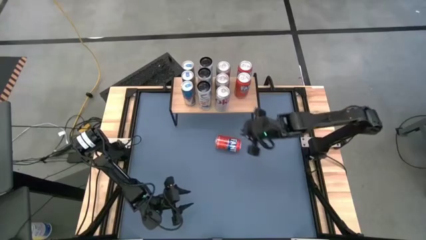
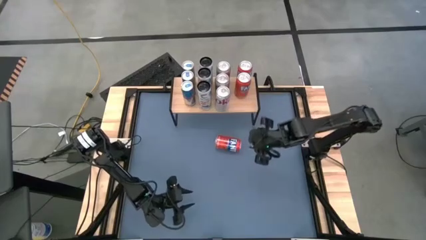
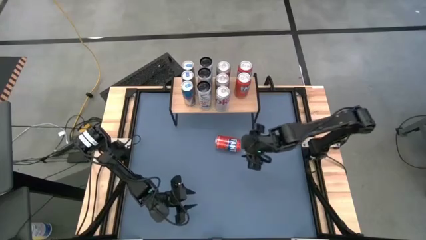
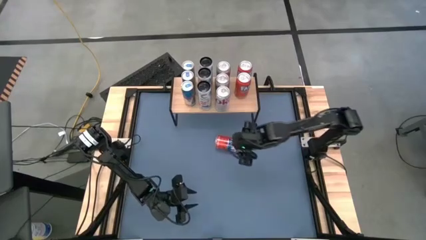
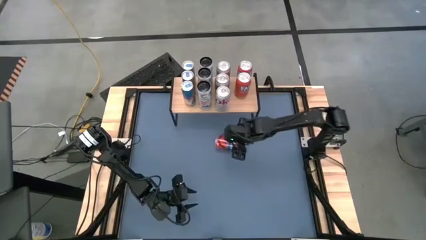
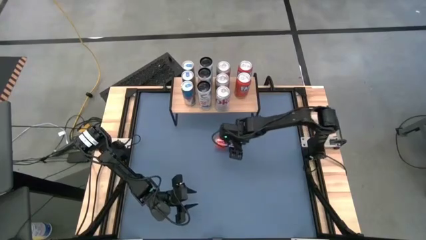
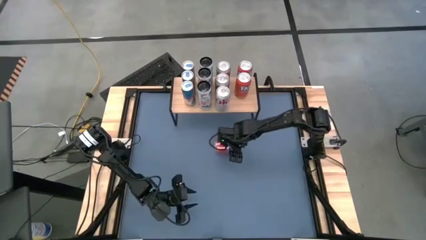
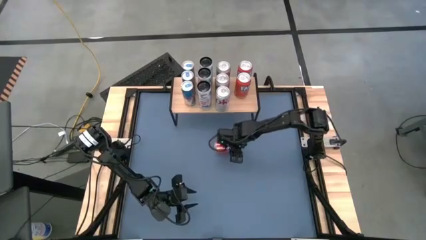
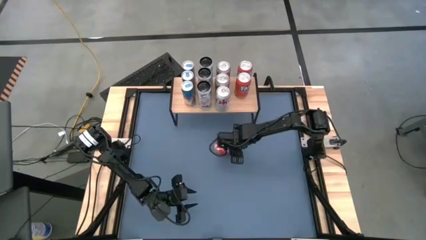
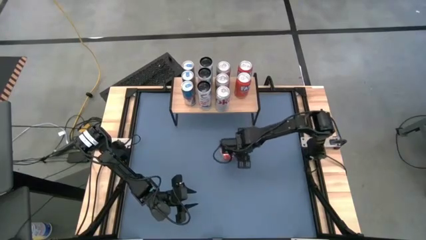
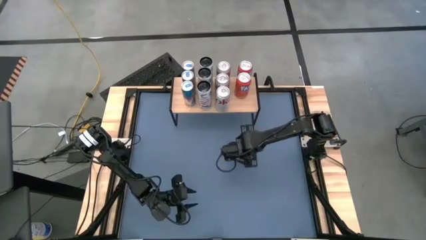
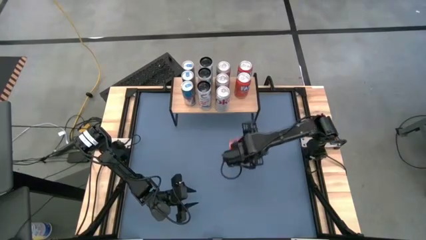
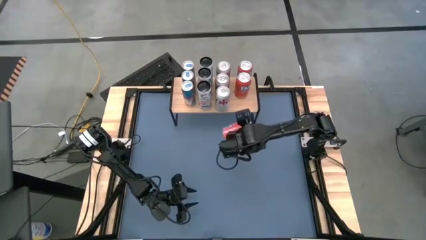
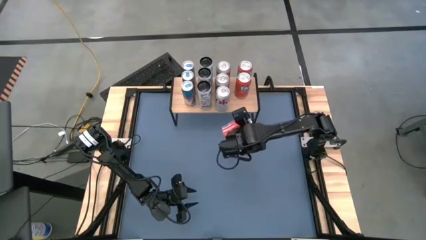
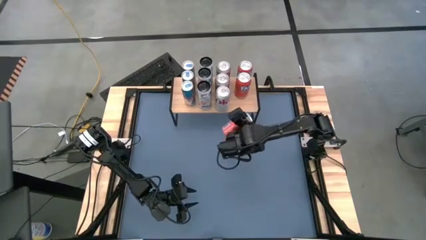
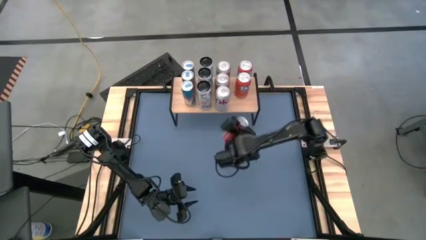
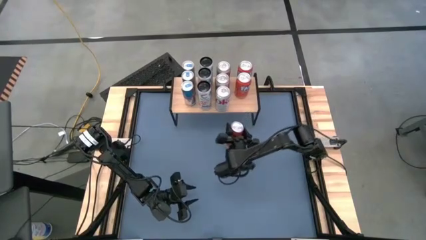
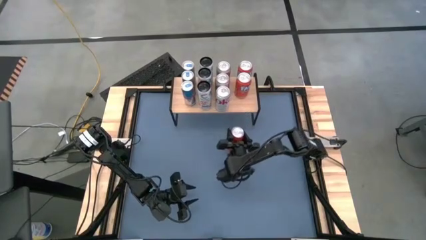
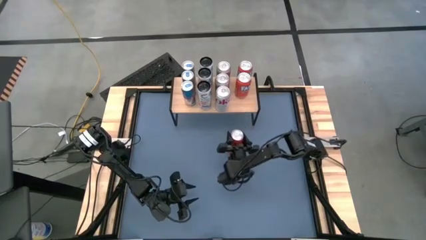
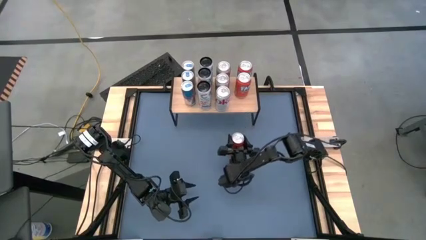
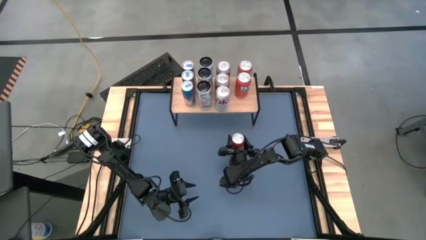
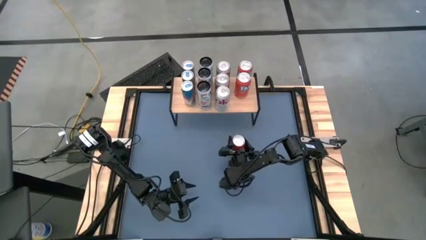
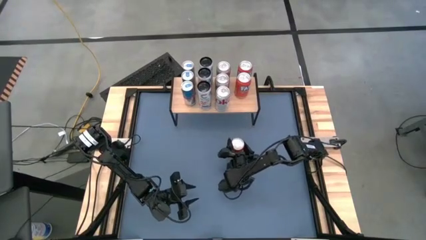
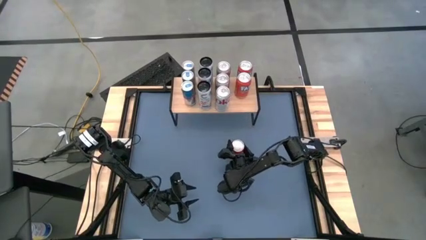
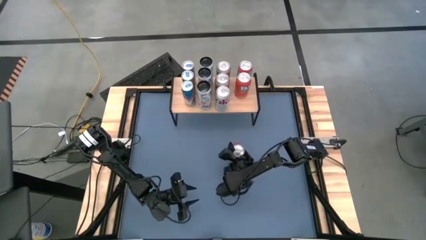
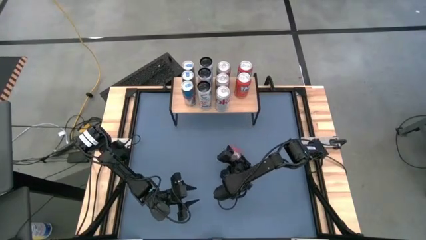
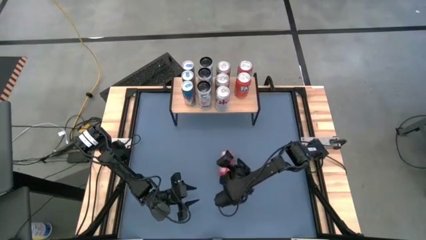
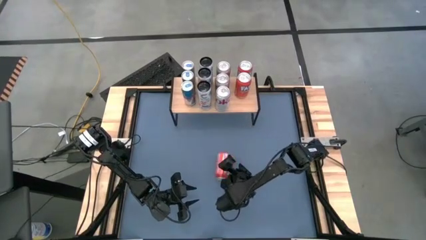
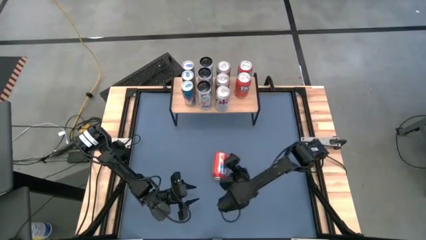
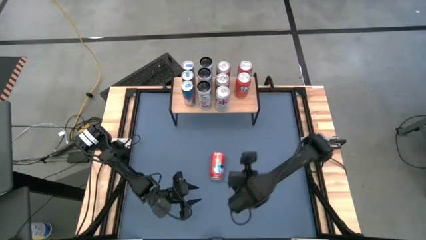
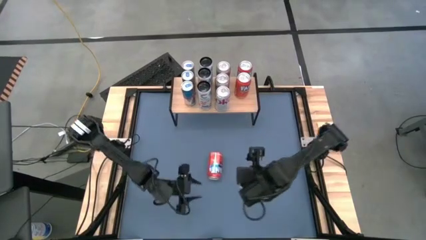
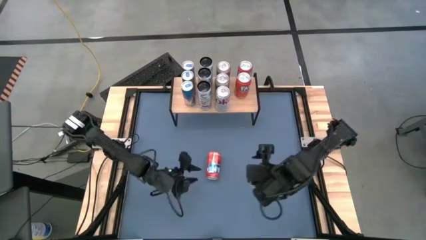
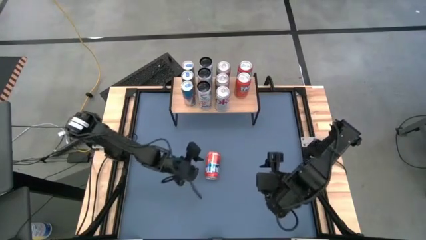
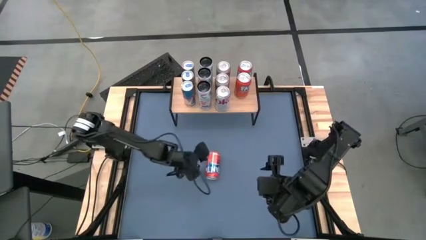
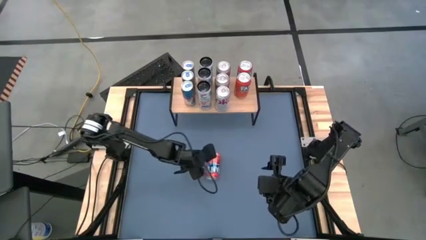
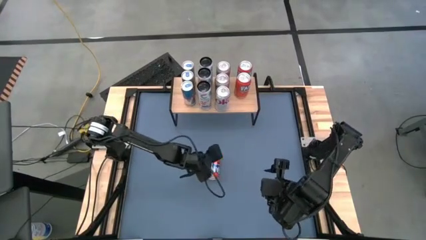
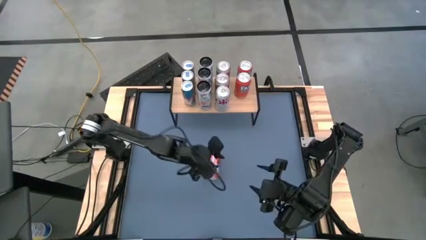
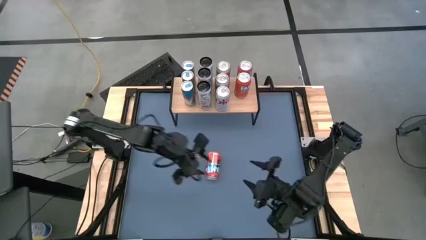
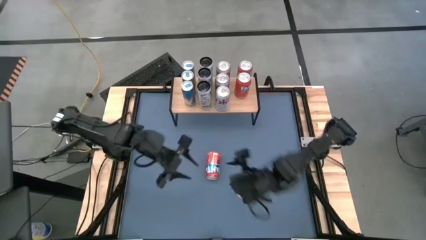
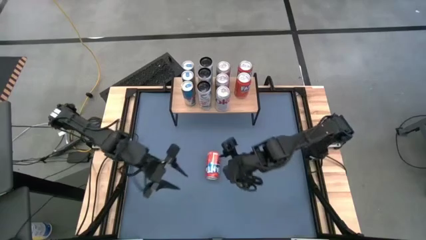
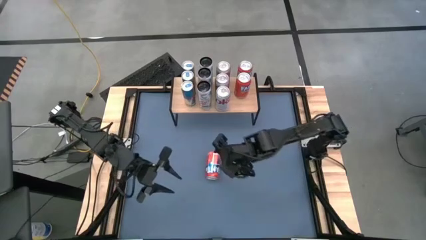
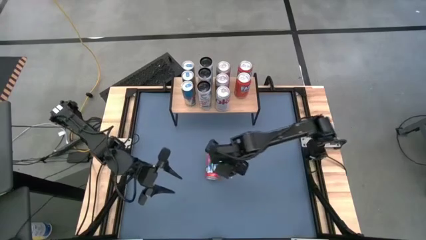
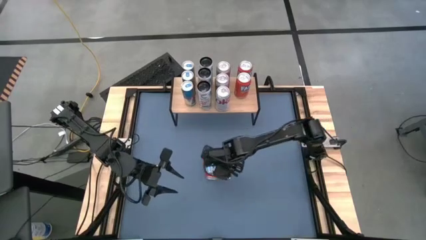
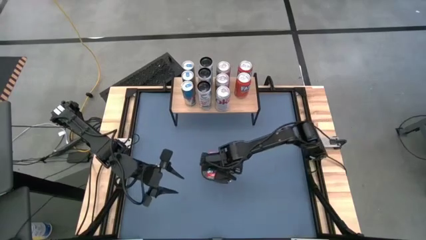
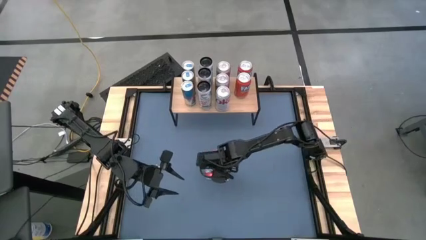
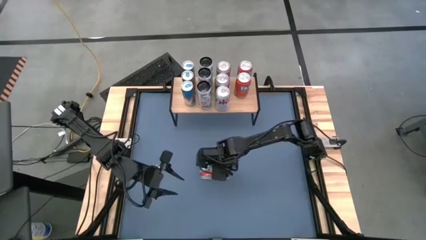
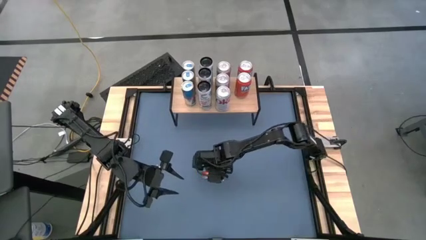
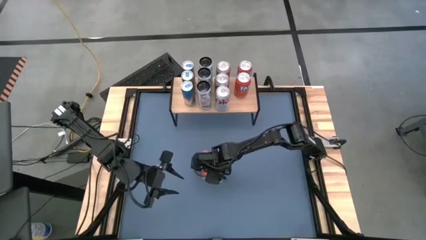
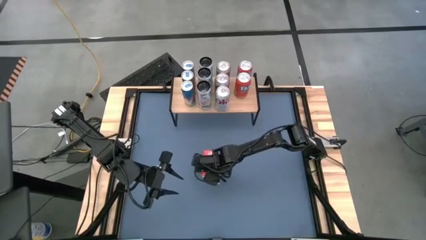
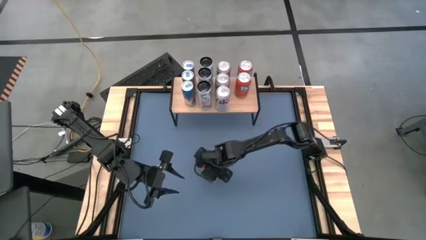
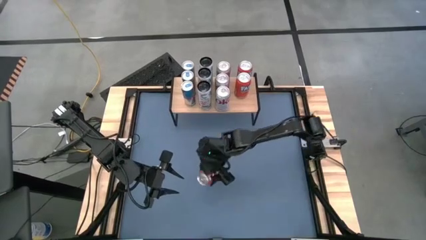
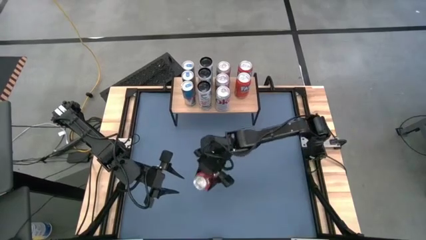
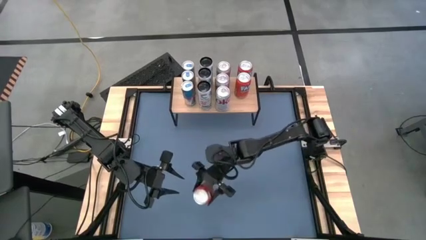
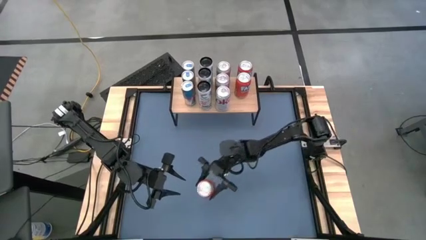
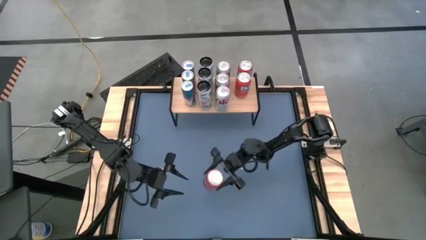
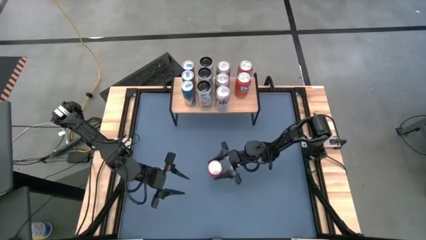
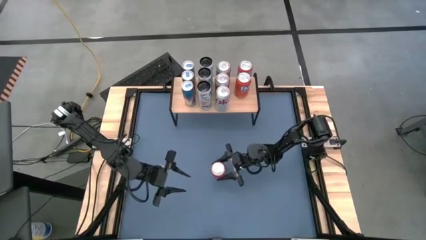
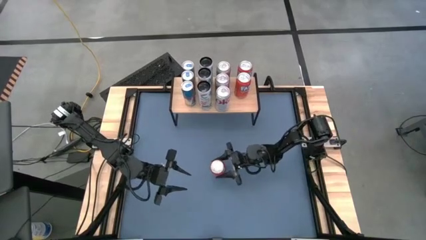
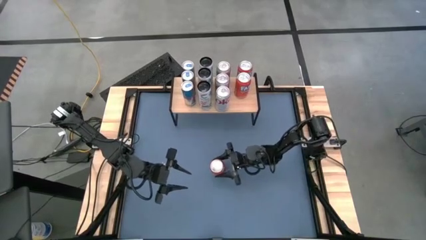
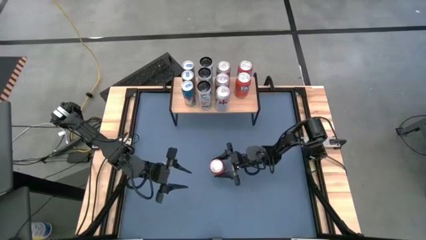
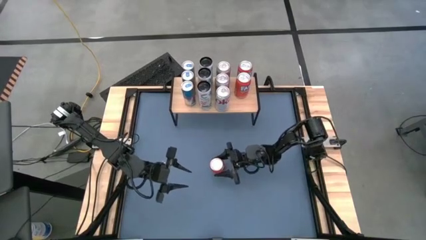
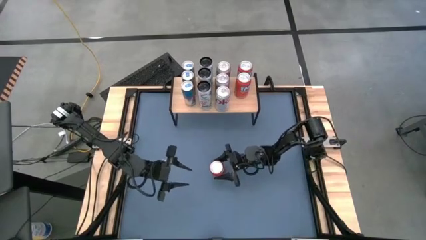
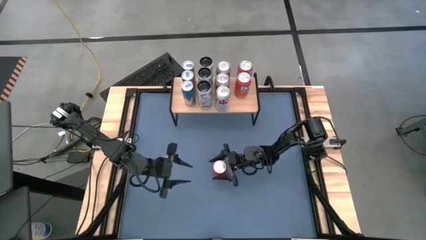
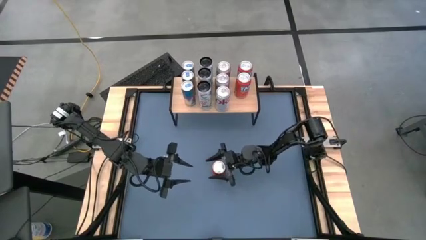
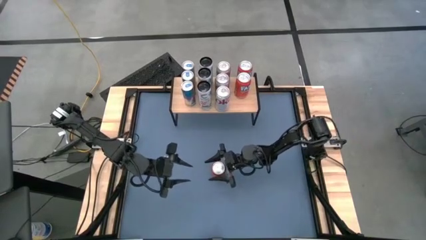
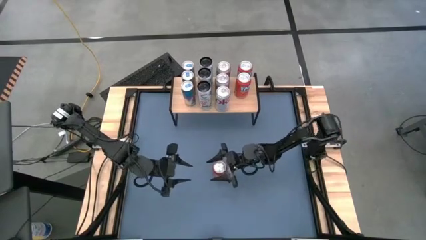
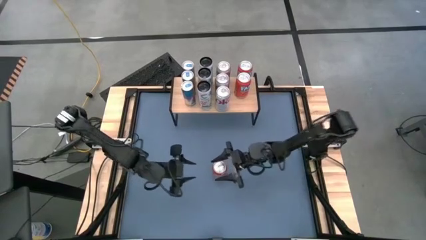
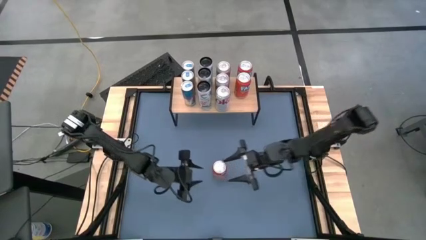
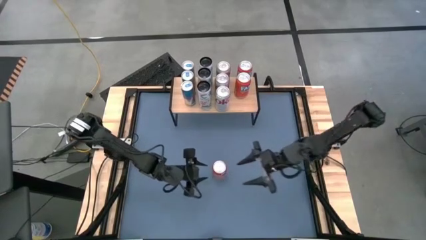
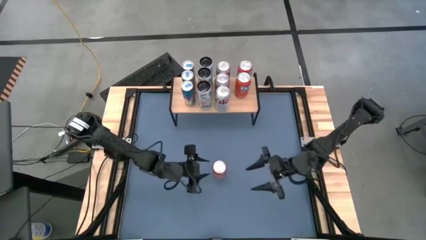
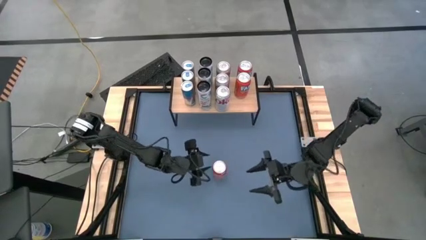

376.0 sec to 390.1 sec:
Task: Place canned beverage on shelf
Put the orange soda can on the shelf aligned with the other orange soda can
